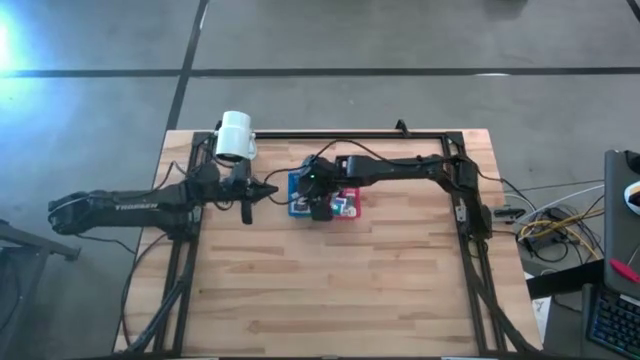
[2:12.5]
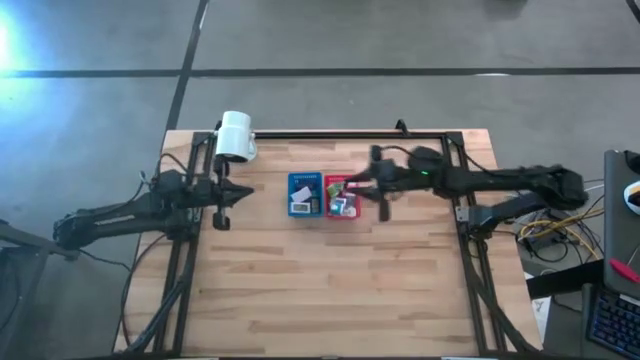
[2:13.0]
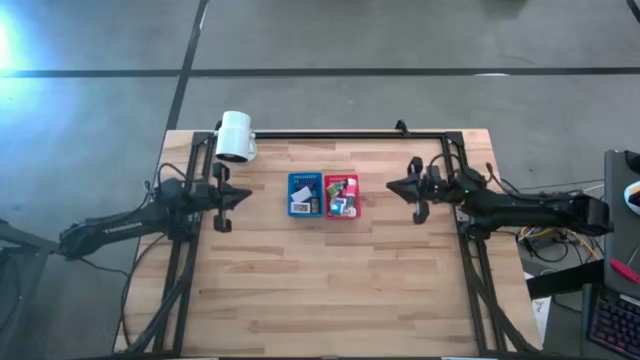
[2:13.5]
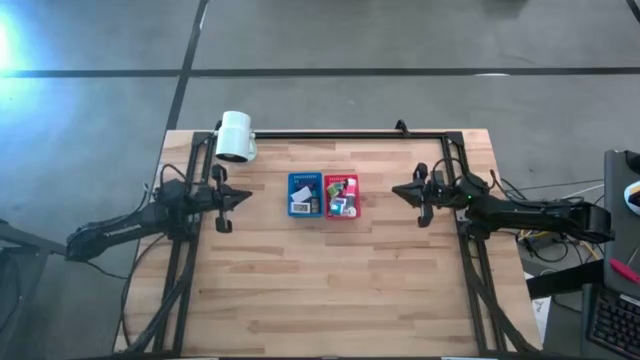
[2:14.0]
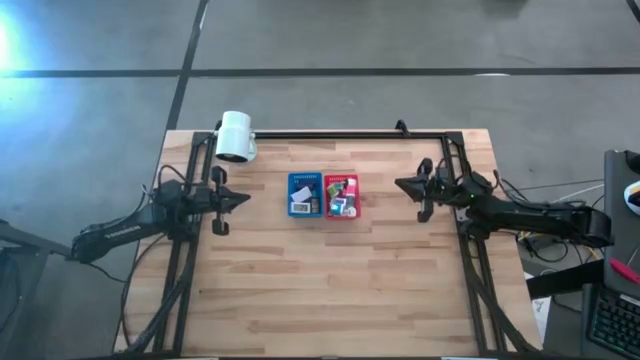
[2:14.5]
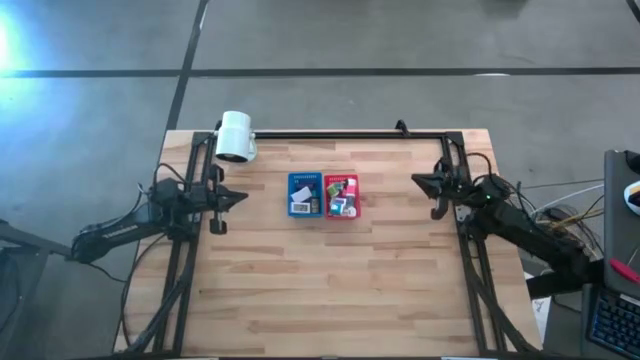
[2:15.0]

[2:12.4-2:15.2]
Task: Pick & Place Office items
Return to Home Position

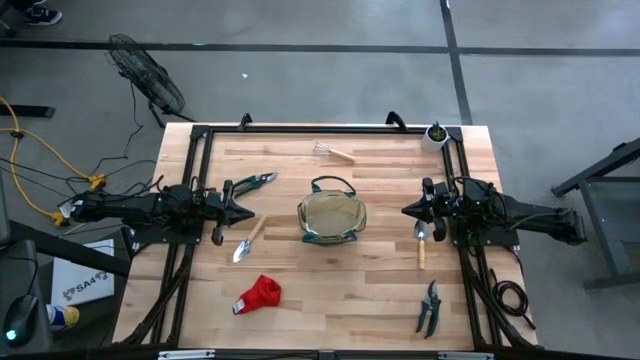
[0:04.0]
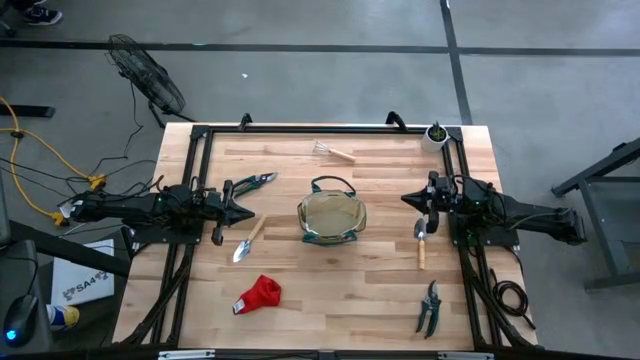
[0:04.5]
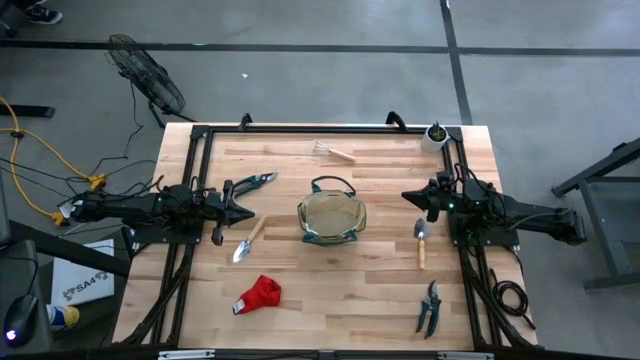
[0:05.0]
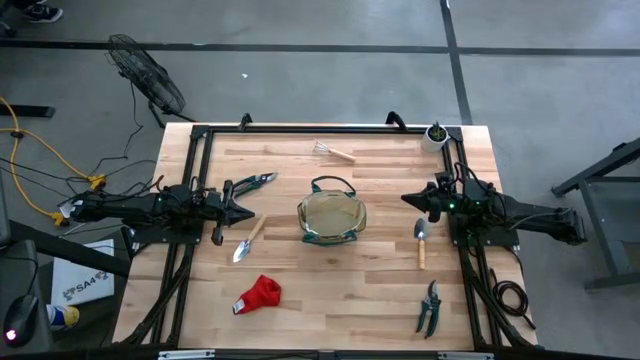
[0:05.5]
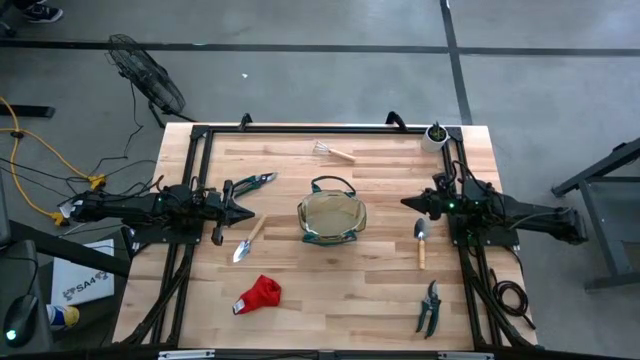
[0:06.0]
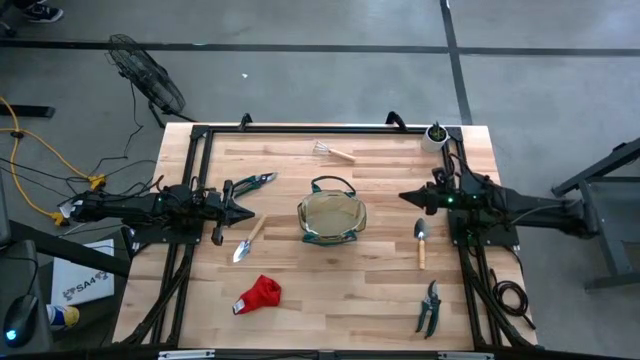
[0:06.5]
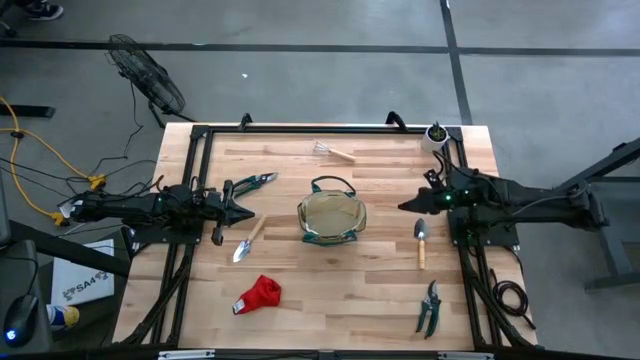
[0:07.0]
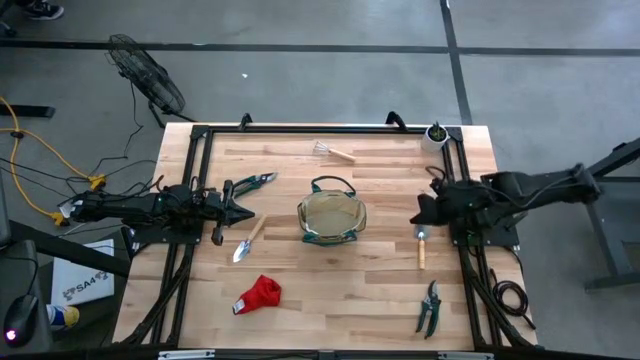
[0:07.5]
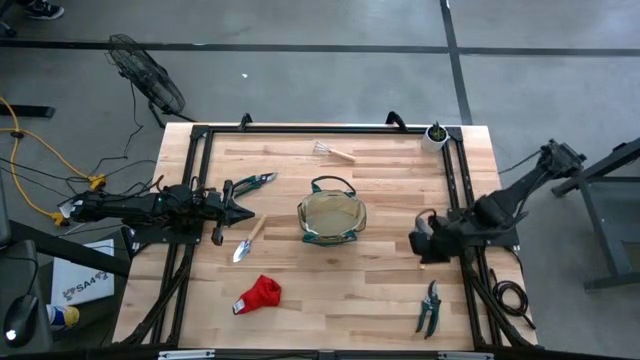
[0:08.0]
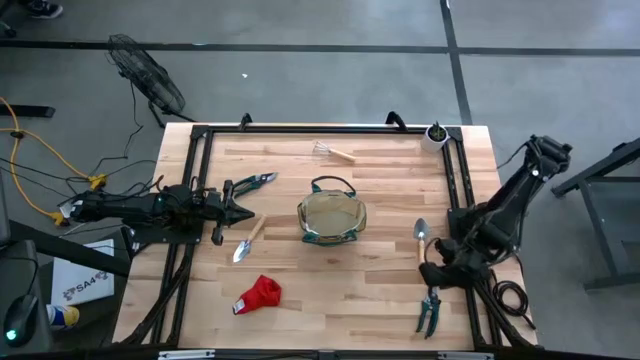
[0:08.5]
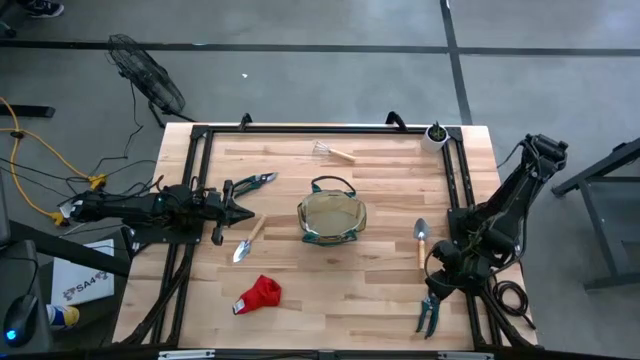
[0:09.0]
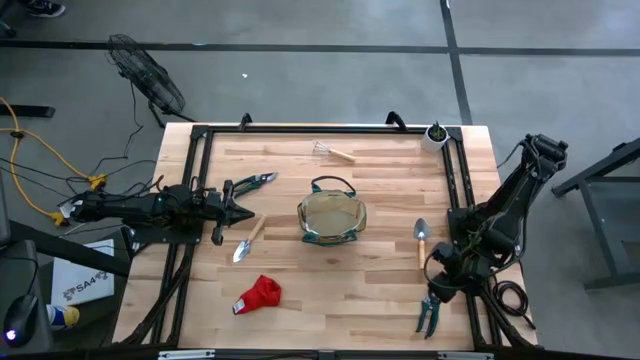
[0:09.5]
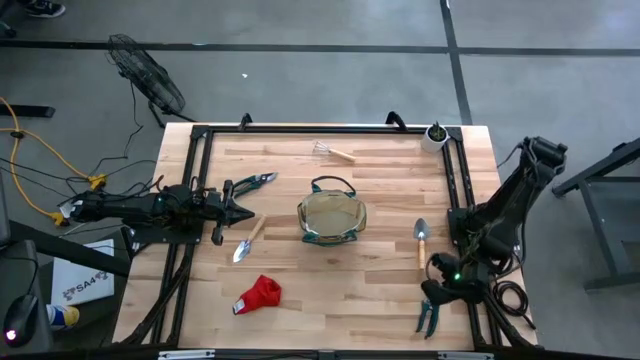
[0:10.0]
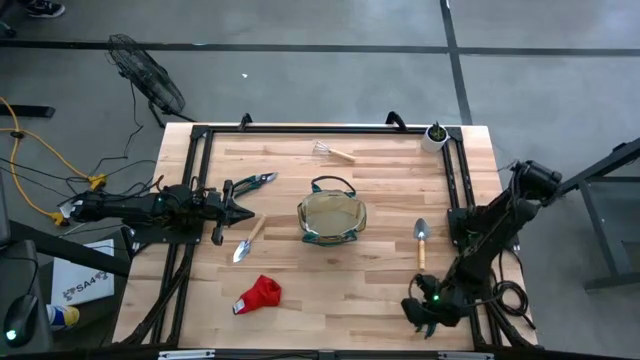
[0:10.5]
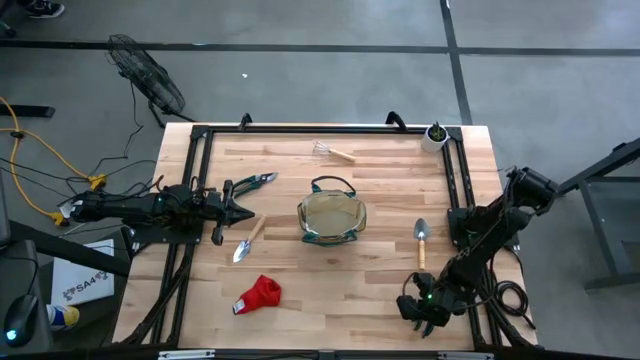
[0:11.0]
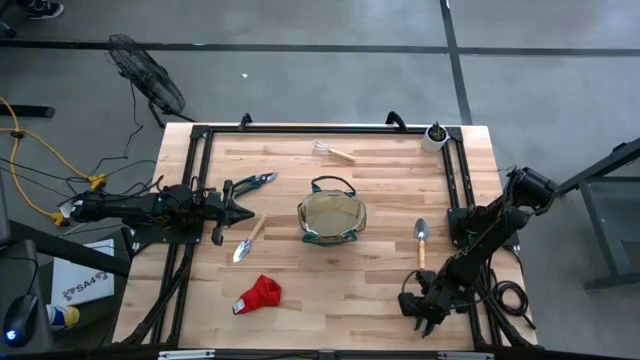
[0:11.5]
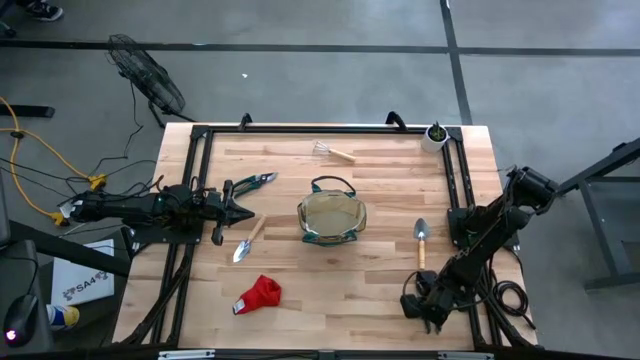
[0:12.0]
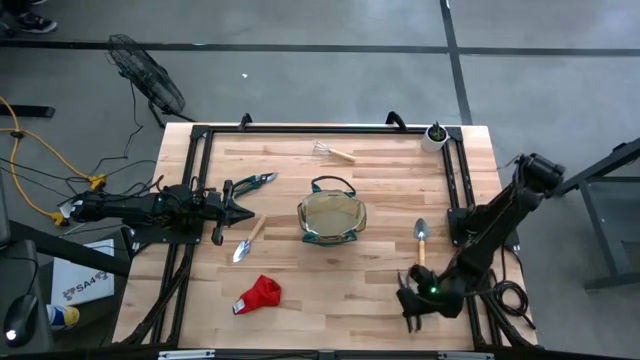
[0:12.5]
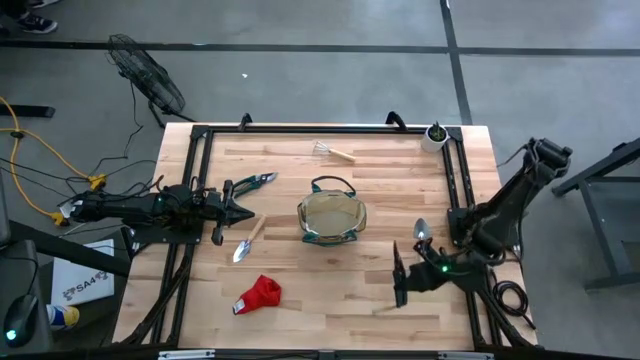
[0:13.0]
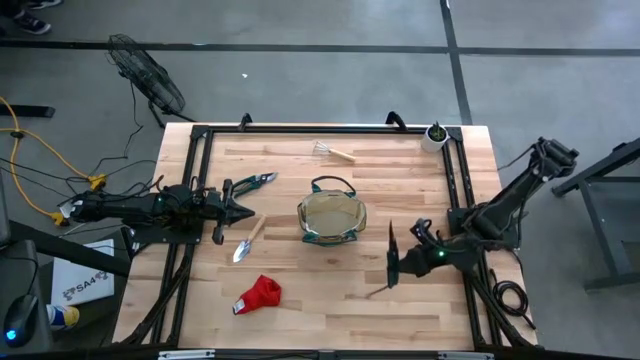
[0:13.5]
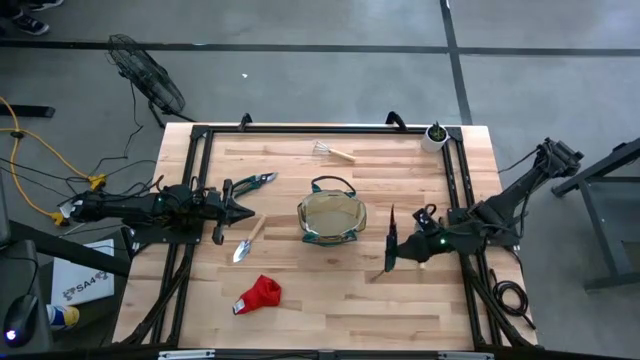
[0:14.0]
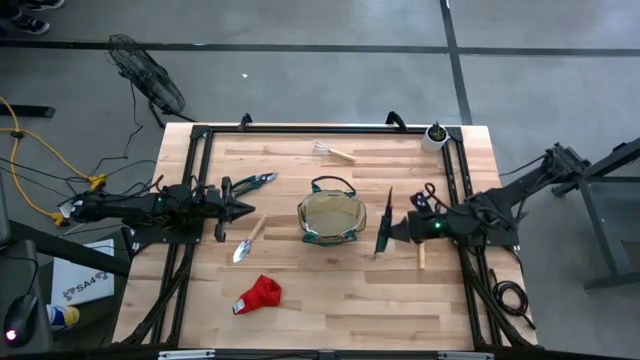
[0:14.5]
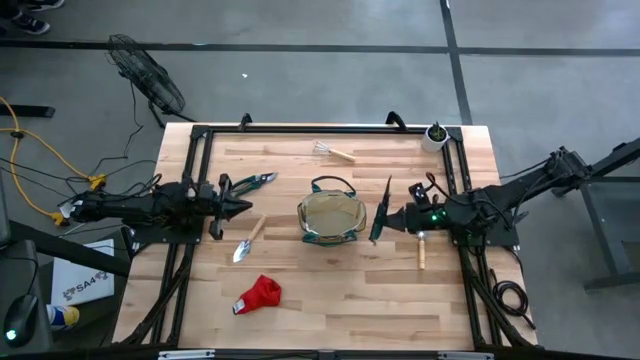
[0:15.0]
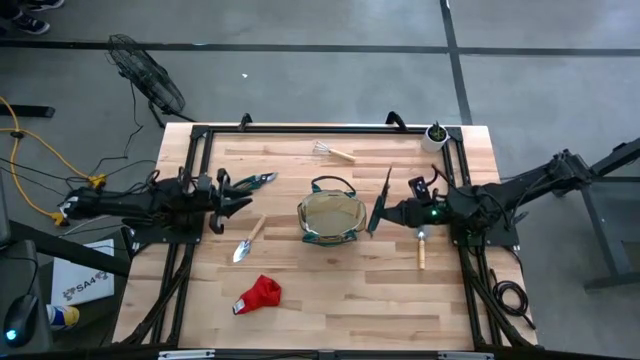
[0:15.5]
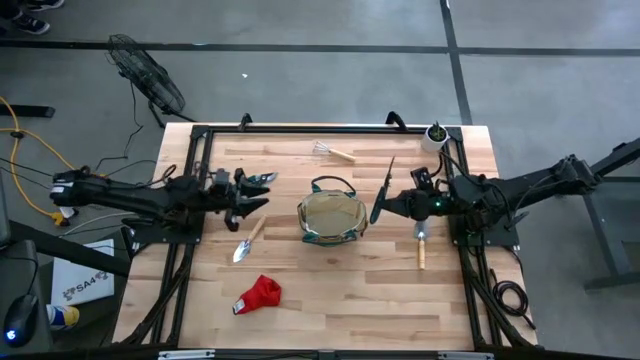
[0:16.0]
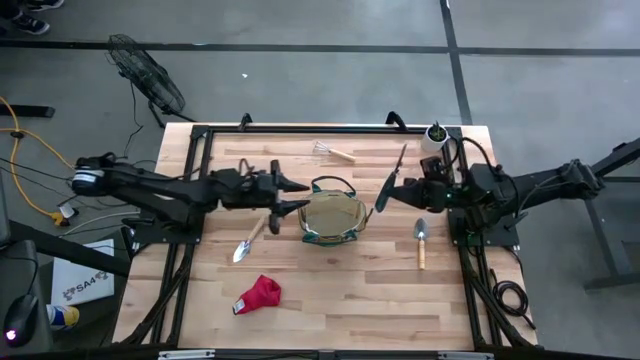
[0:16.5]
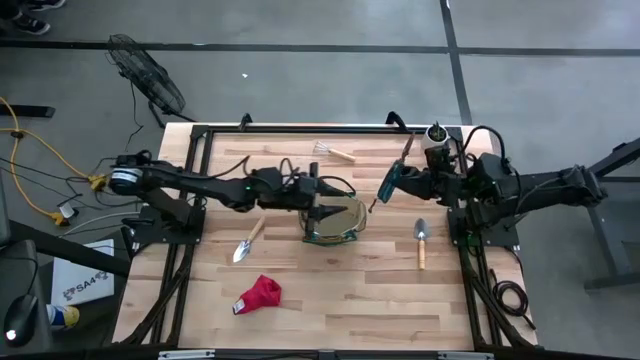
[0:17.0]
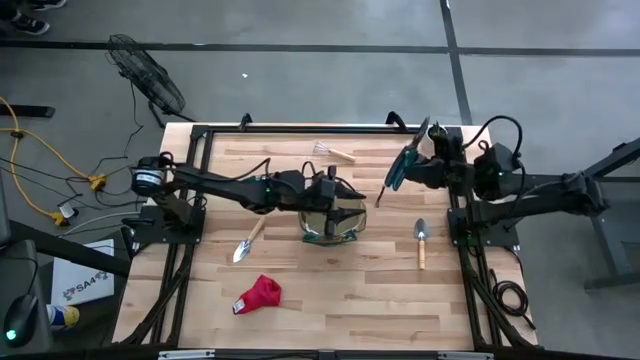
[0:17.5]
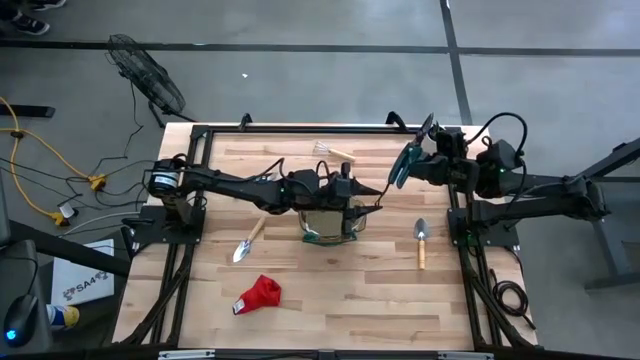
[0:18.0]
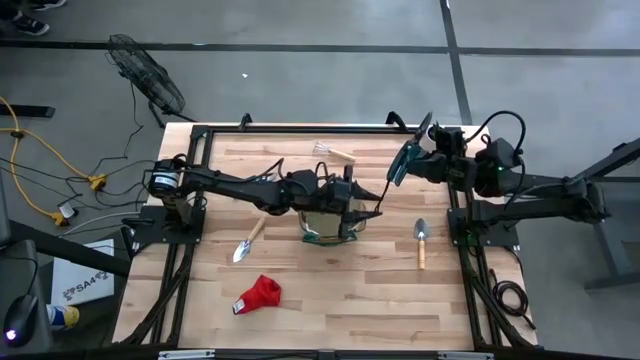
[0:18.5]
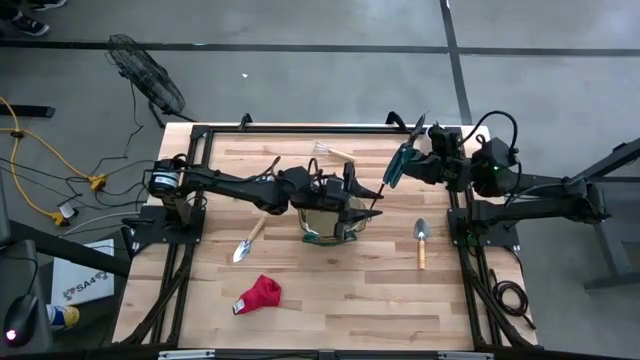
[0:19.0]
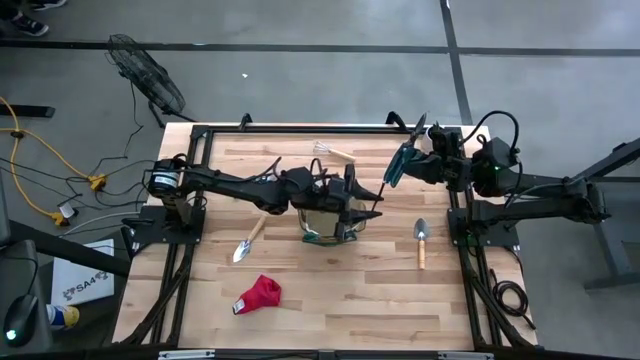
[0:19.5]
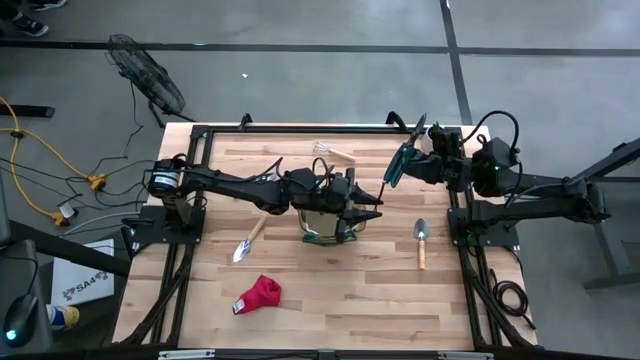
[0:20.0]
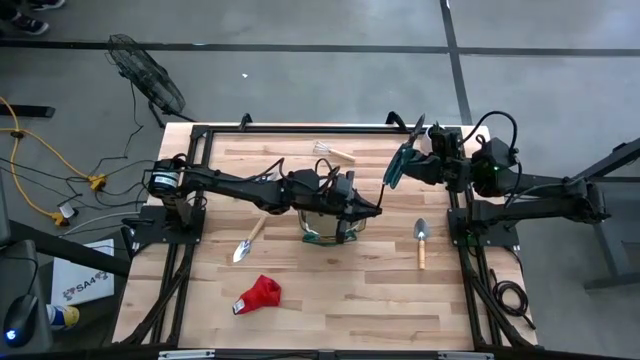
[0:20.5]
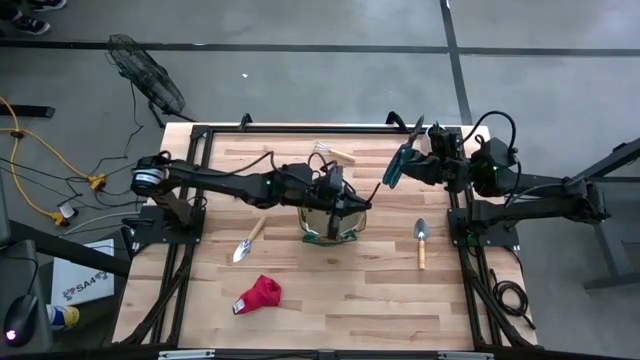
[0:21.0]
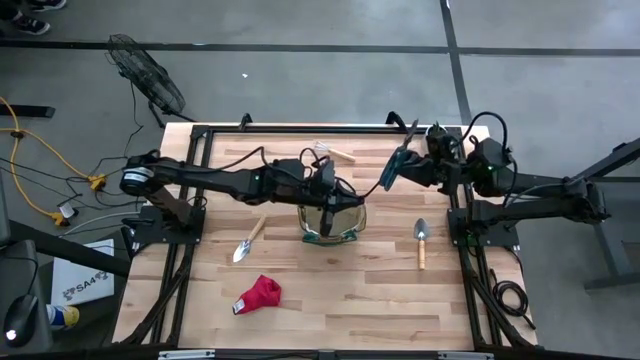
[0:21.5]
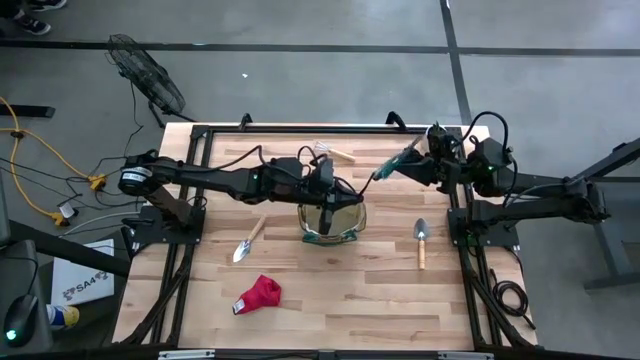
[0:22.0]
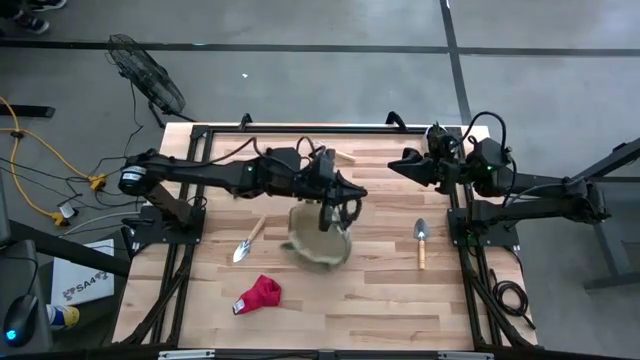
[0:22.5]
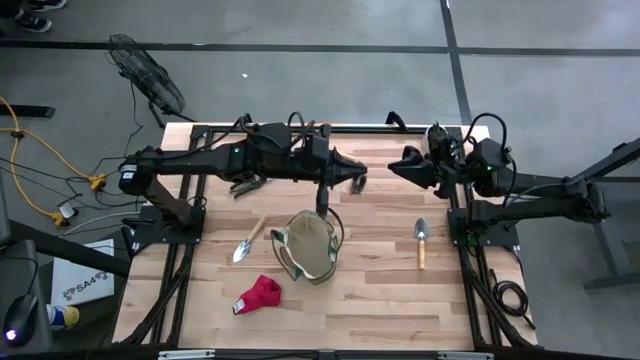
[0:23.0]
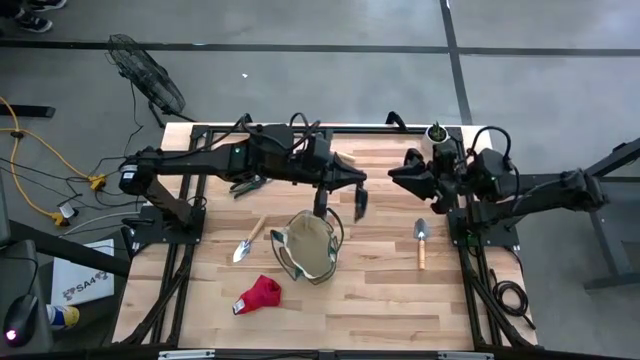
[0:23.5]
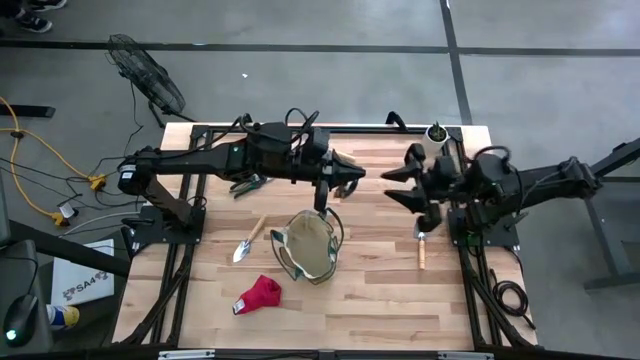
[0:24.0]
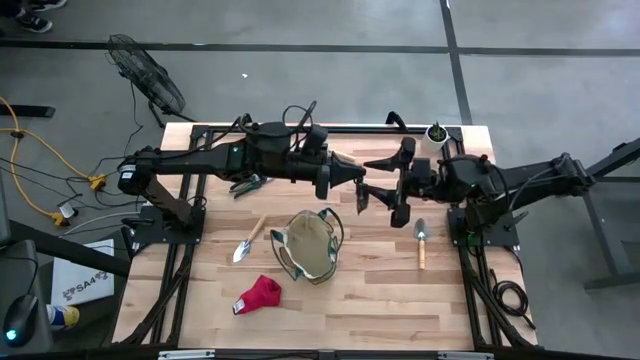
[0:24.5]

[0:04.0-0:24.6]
Task: Pick & Place Garden tools in Gardening bag
Put the right green shear scissors into the light brown gardening bag
